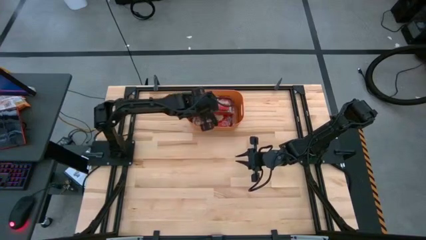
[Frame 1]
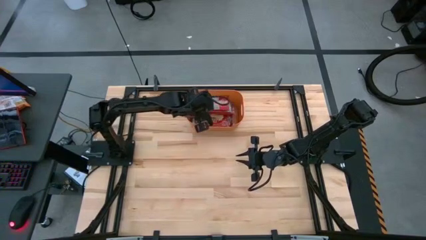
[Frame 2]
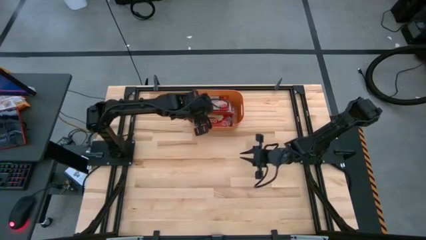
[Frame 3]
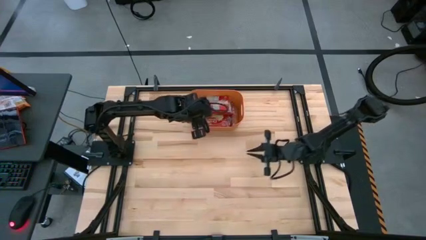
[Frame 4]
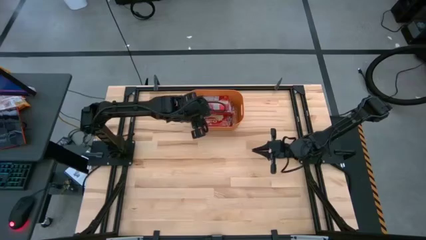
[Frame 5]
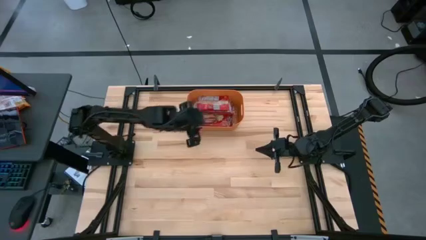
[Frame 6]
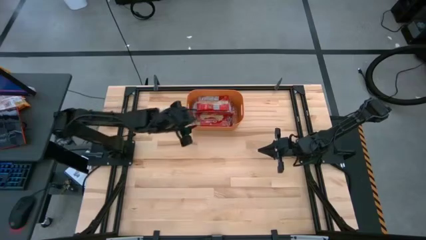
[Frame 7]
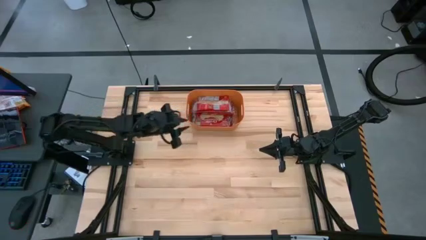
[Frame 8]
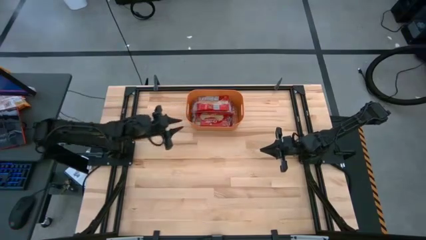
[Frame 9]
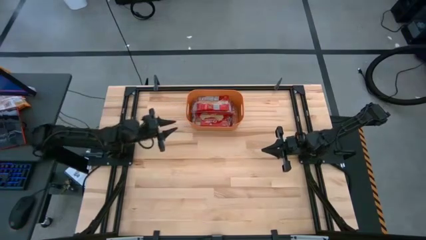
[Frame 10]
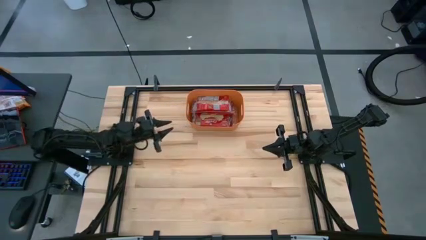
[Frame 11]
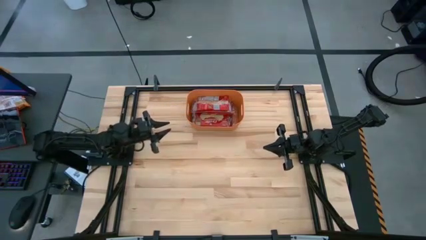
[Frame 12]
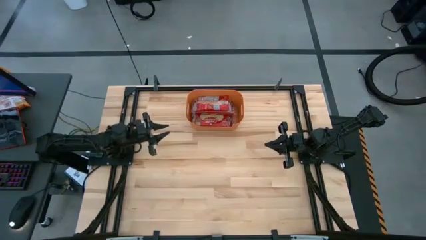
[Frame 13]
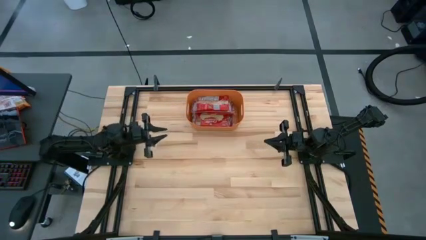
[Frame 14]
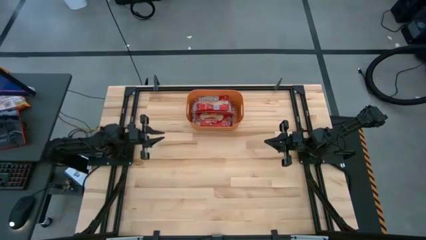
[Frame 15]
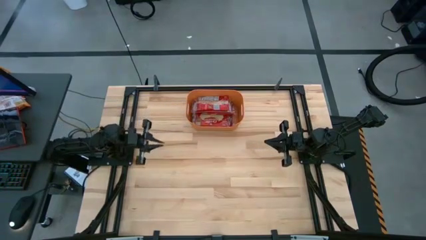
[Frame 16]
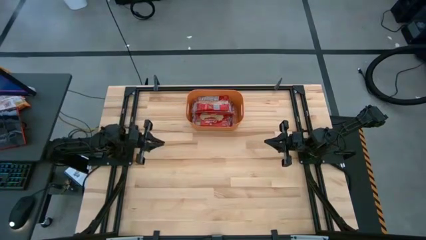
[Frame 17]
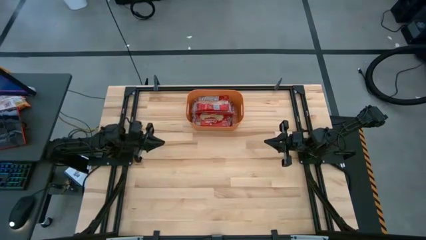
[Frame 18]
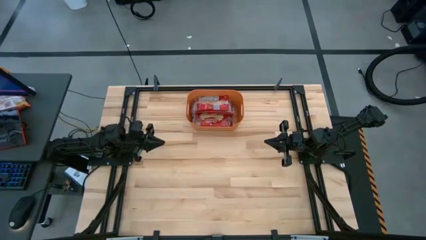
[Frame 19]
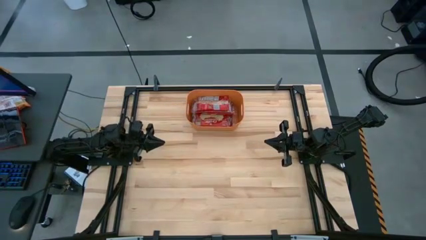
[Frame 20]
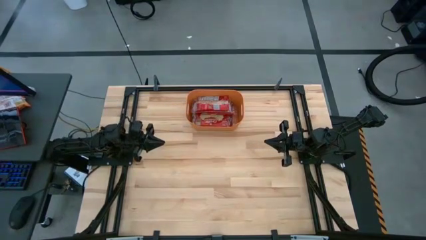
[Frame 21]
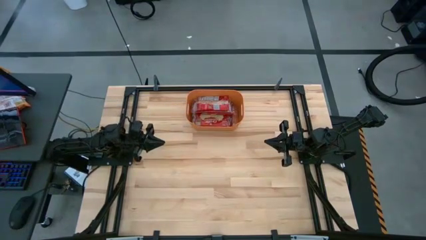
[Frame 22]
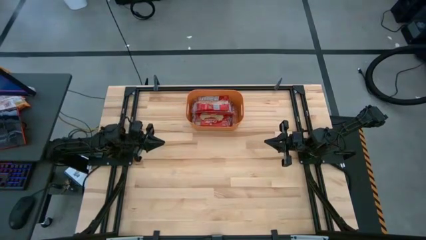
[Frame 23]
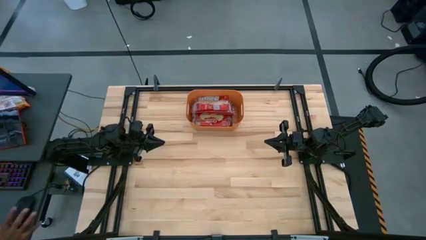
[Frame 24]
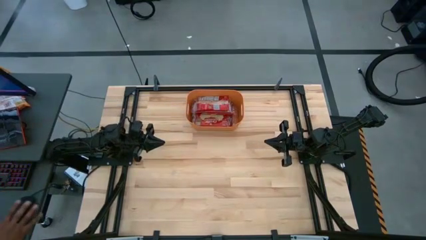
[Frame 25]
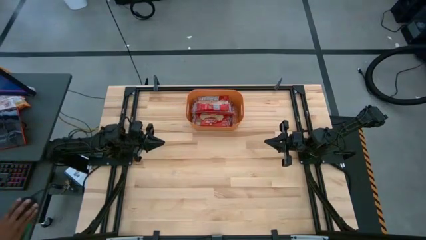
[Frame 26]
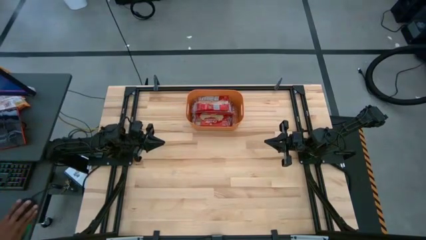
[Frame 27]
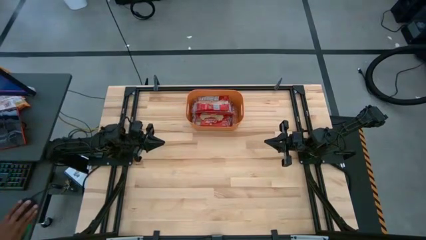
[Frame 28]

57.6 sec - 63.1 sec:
Task: Sort popcorn bags into baskets
Return to Home Position

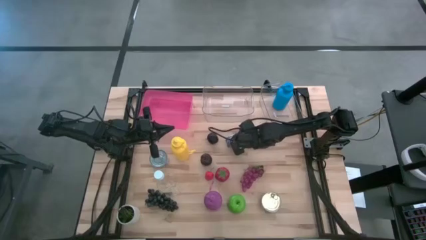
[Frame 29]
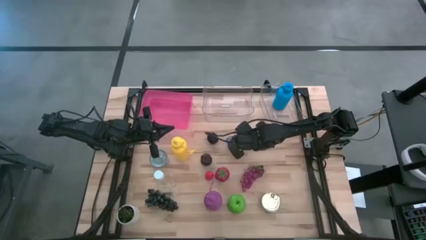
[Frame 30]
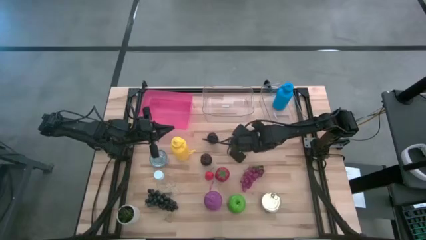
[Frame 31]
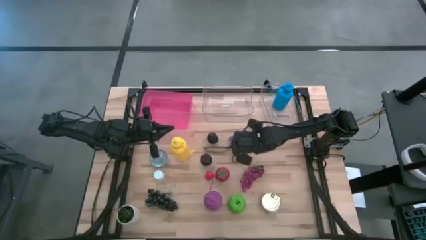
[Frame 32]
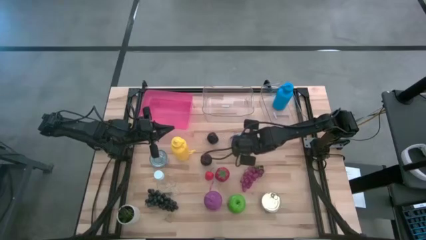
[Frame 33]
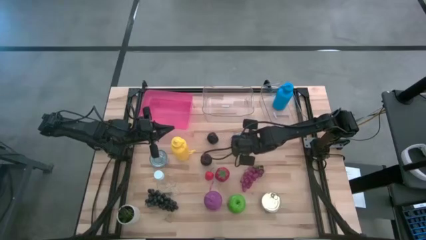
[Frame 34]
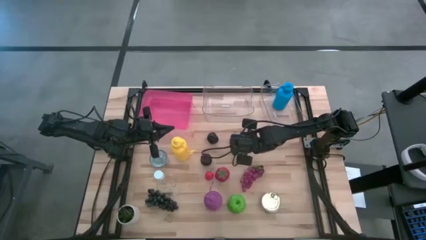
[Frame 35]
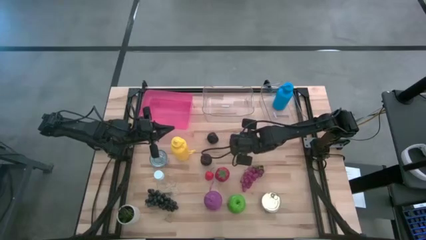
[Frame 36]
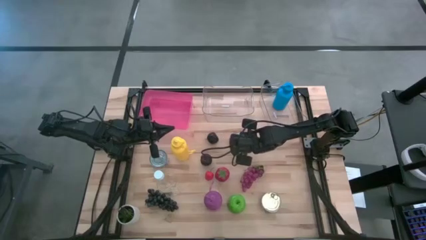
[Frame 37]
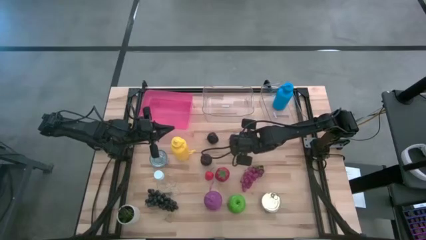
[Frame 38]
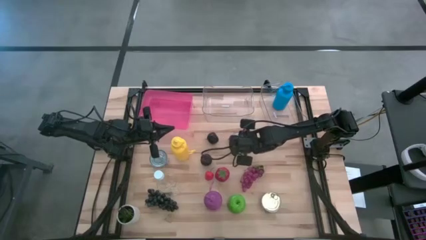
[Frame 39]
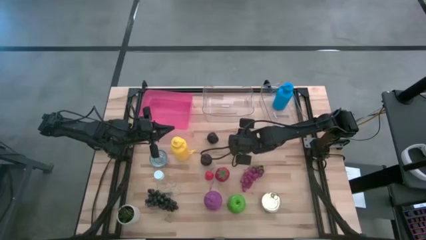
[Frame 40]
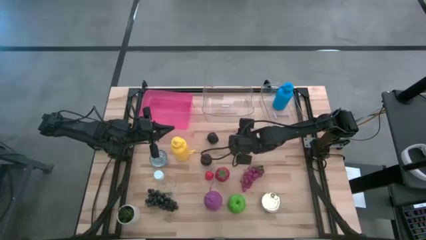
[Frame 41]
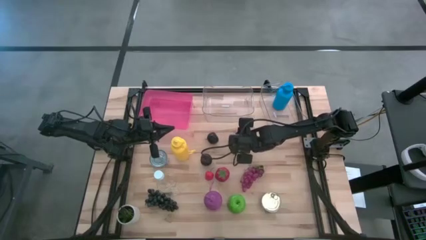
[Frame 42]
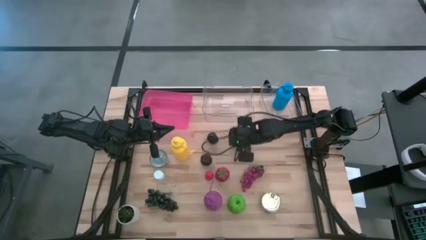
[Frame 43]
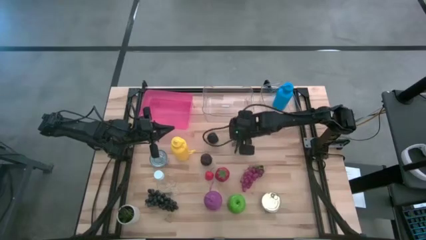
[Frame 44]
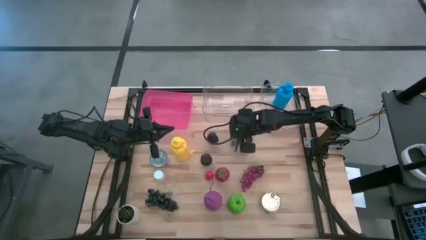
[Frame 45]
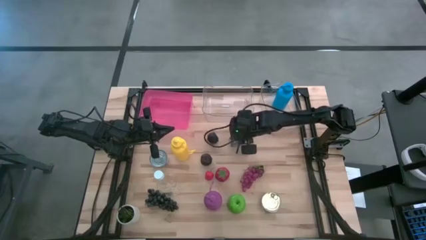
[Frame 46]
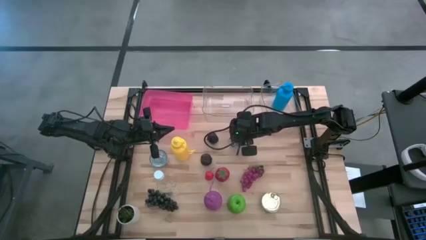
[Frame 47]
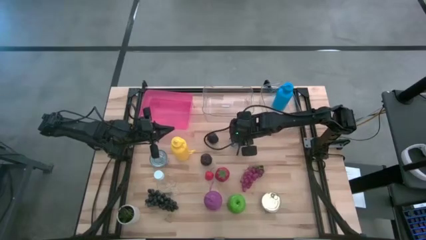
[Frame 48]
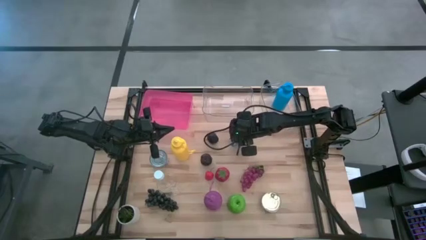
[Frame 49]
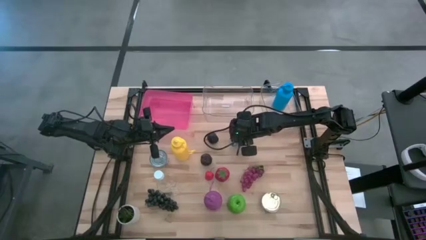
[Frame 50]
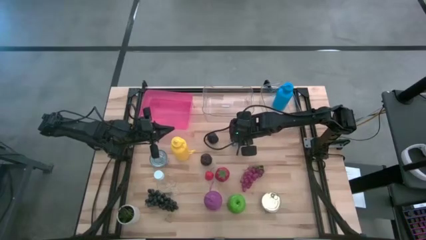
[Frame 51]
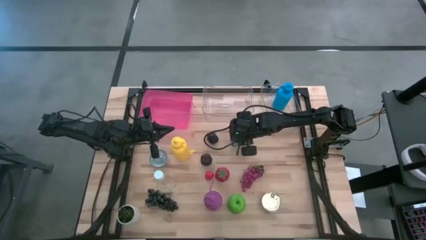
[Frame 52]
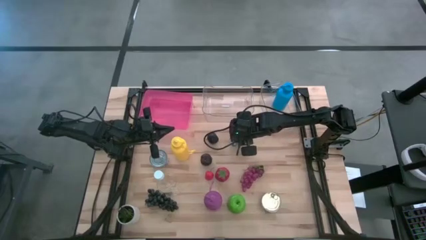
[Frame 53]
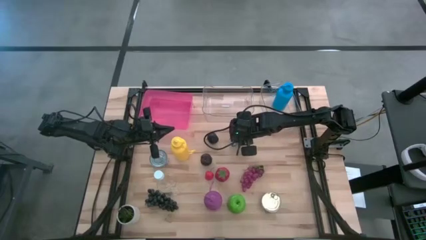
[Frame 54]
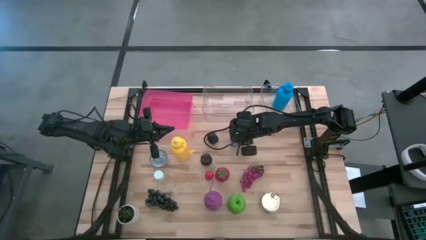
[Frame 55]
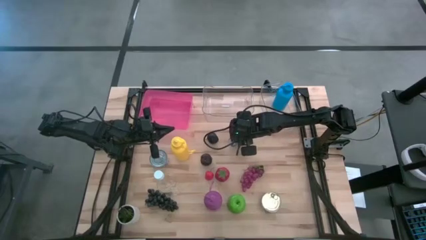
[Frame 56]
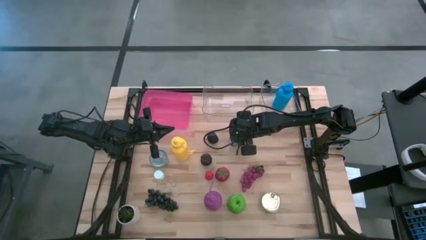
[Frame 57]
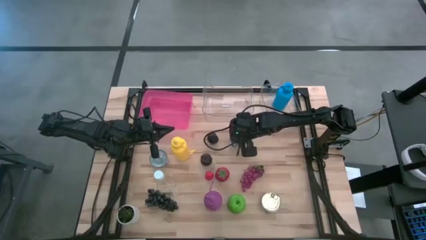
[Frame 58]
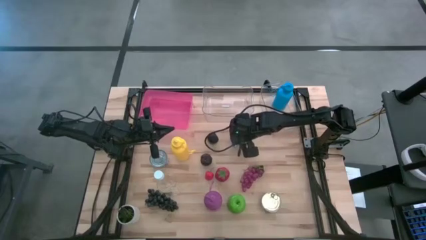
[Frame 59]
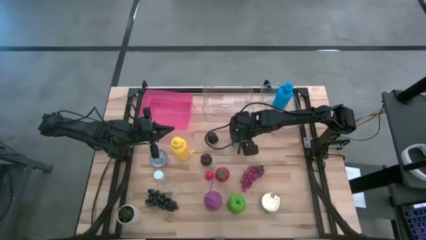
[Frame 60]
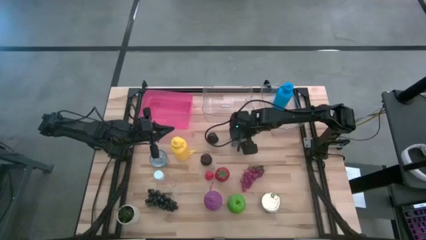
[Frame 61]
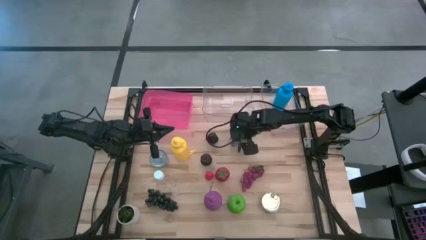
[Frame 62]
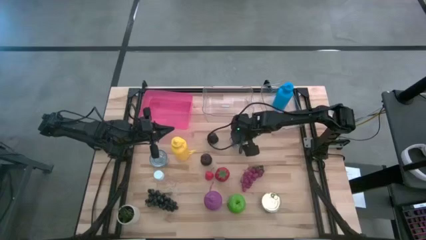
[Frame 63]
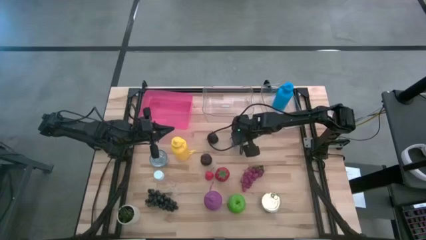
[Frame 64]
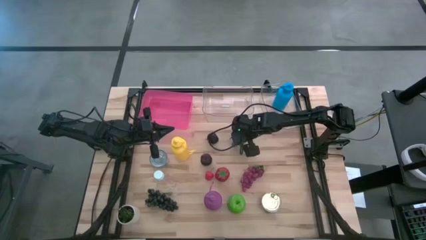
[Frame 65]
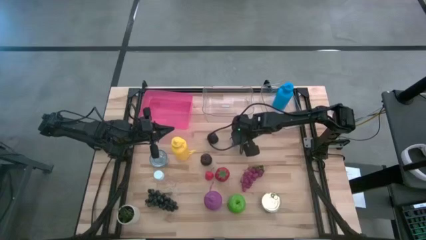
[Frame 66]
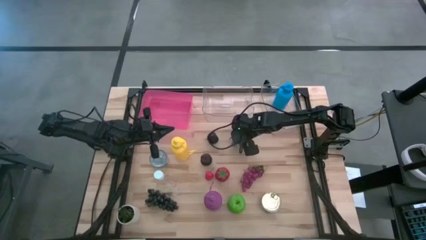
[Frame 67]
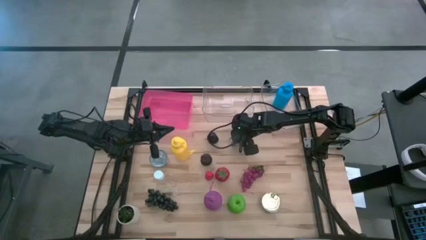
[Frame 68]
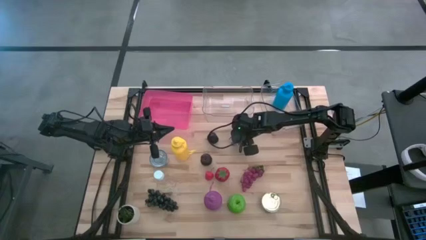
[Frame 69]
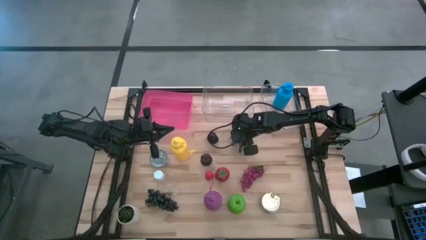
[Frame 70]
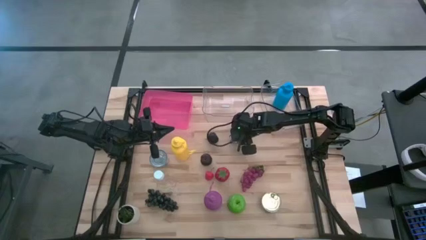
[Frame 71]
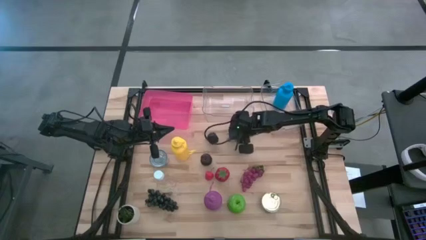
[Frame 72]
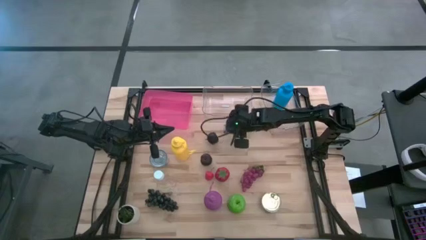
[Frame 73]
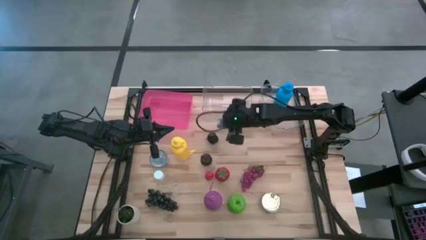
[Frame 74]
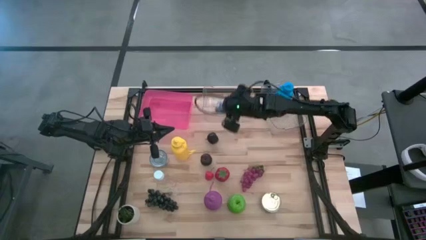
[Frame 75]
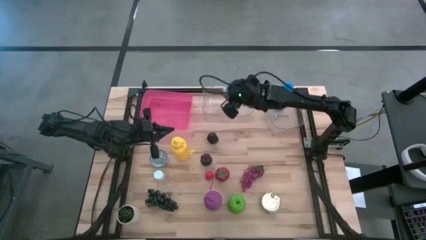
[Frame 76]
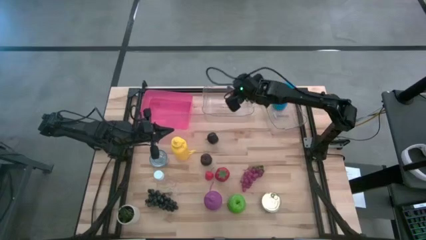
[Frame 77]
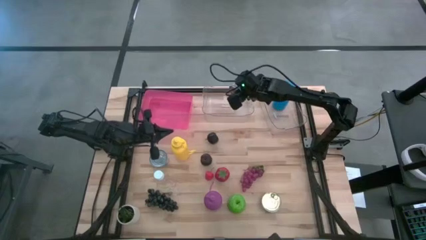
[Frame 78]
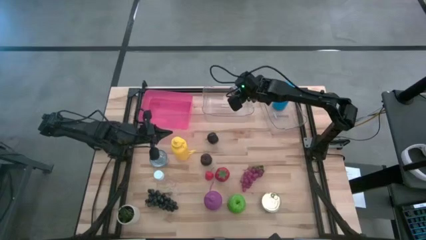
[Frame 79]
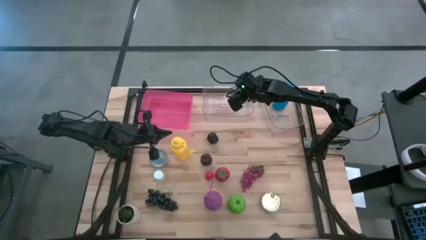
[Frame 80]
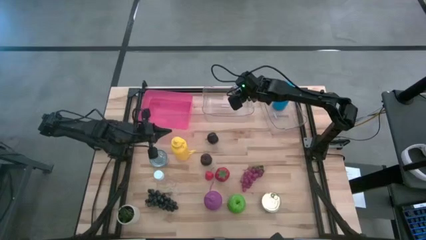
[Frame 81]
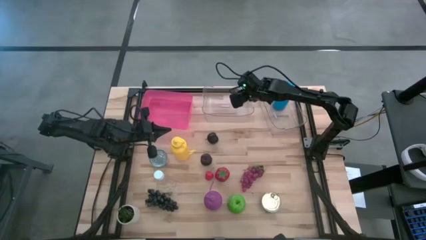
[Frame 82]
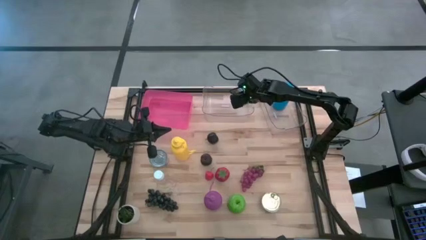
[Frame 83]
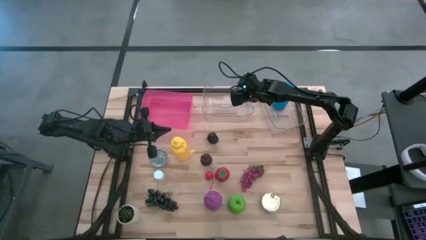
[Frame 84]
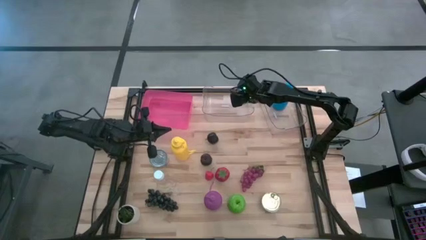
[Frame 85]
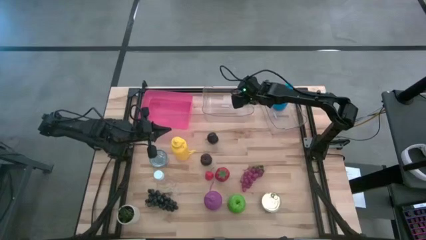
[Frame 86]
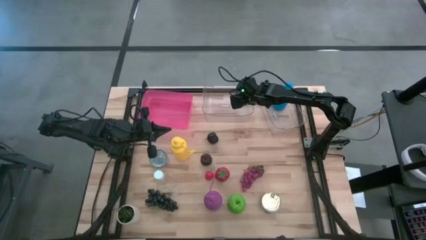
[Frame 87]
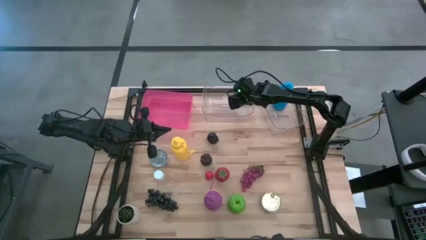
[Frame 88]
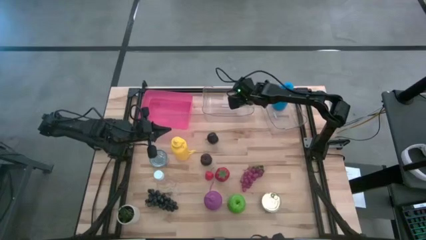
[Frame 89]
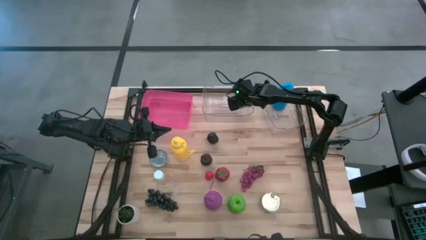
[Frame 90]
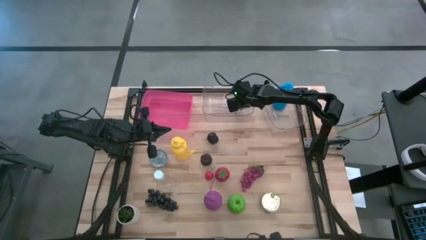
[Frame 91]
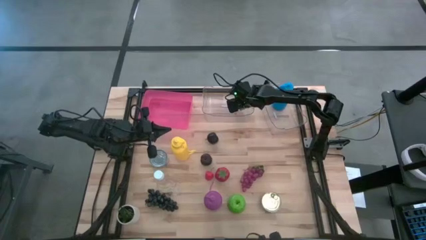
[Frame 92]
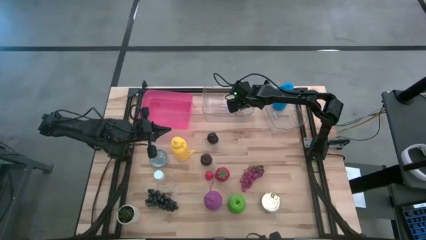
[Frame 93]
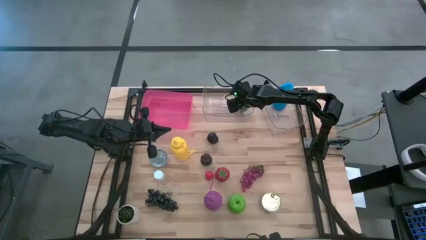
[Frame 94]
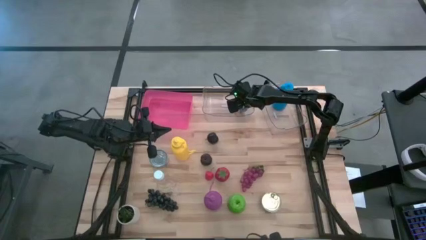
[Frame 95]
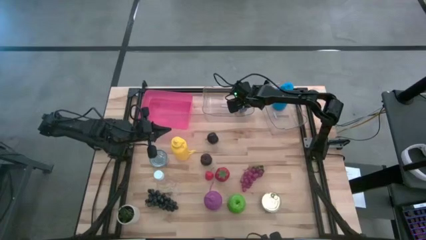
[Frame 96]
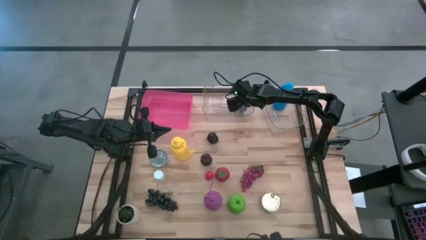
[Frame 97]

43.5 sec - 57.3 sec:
Task: Pick & Place Food Item
Put the dark blue tuna can into the left transparent bin
